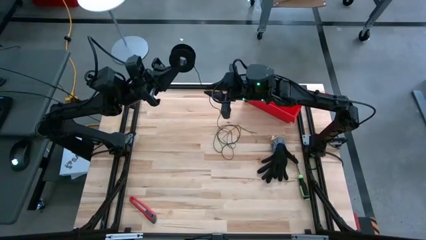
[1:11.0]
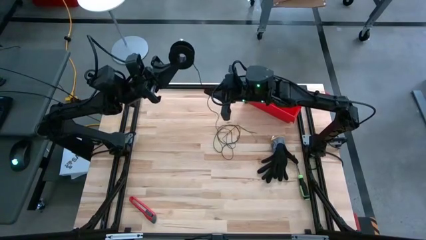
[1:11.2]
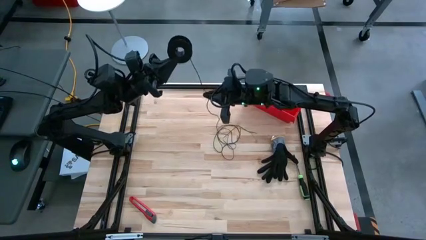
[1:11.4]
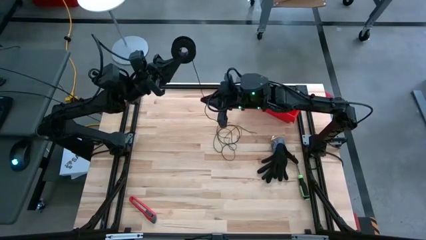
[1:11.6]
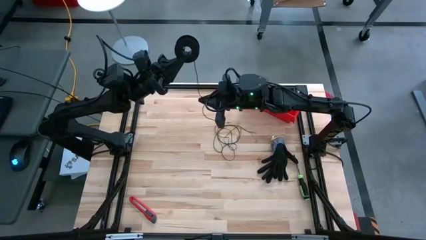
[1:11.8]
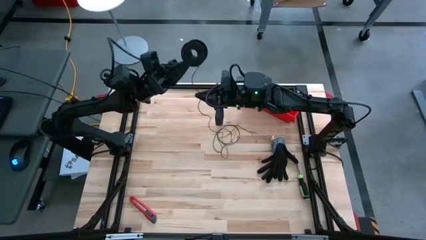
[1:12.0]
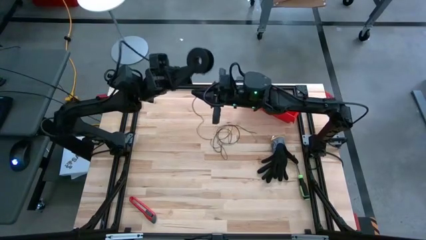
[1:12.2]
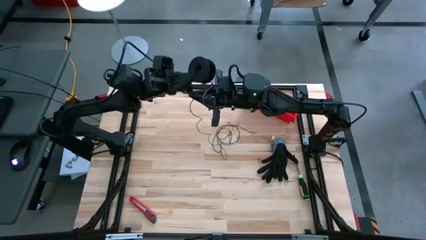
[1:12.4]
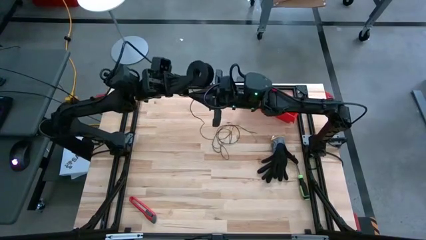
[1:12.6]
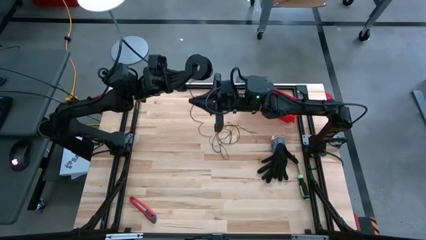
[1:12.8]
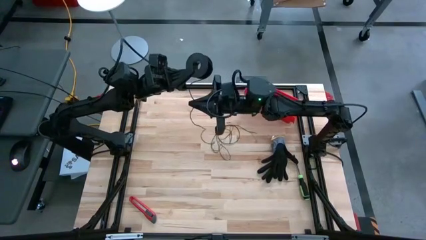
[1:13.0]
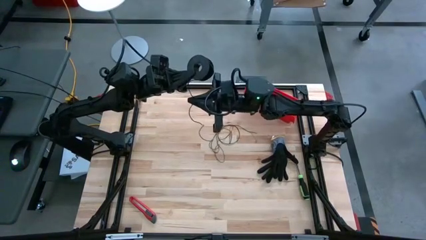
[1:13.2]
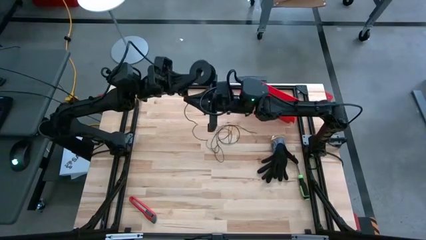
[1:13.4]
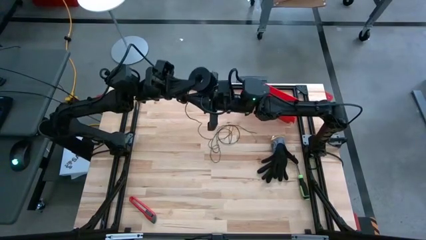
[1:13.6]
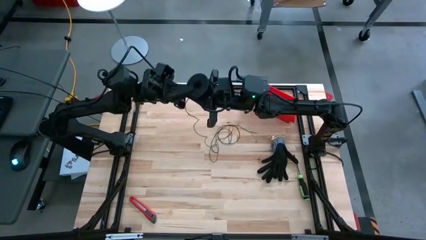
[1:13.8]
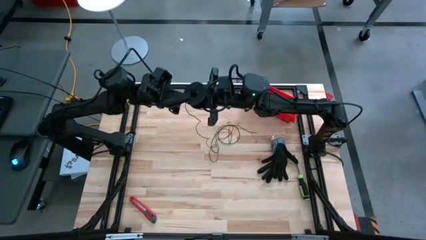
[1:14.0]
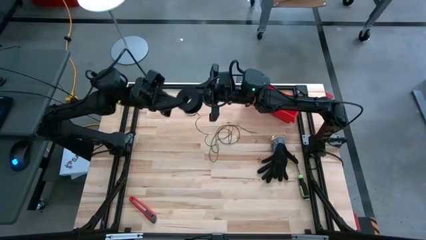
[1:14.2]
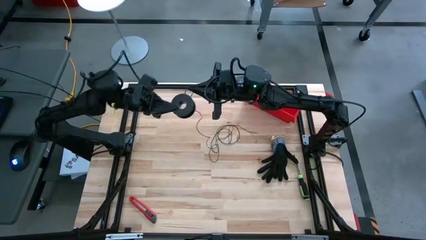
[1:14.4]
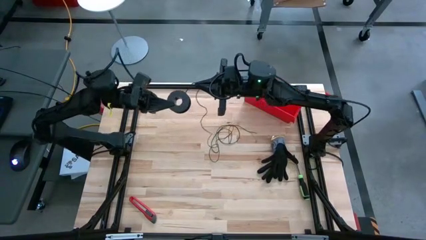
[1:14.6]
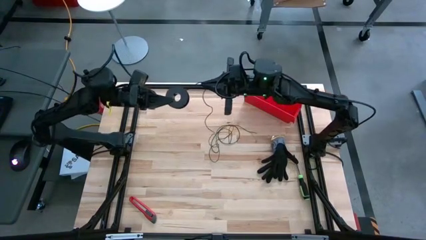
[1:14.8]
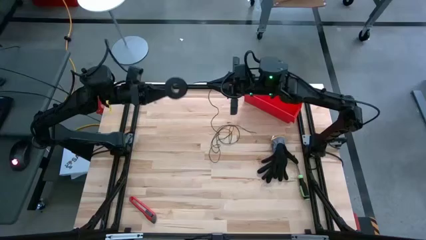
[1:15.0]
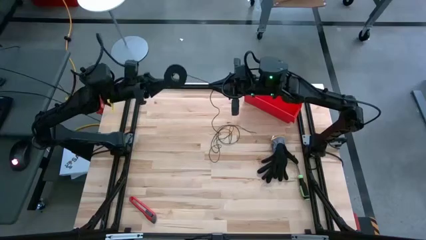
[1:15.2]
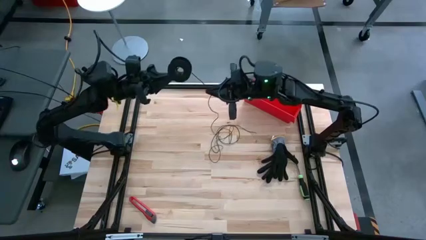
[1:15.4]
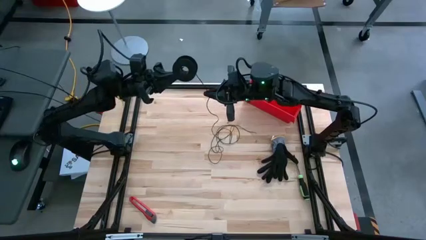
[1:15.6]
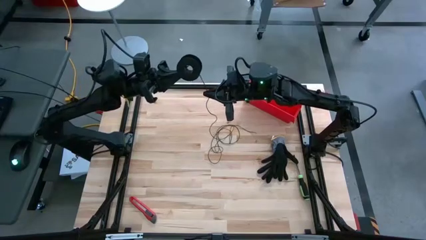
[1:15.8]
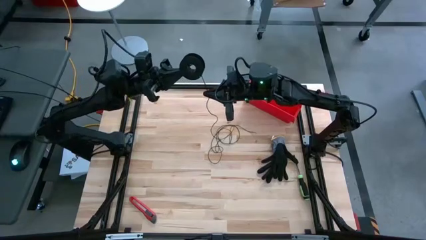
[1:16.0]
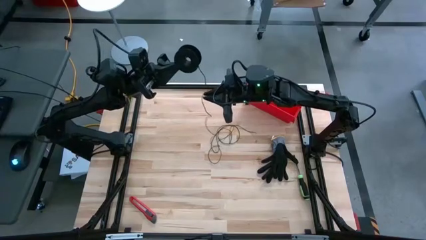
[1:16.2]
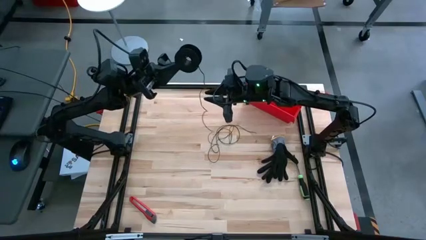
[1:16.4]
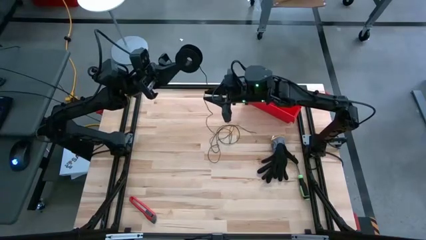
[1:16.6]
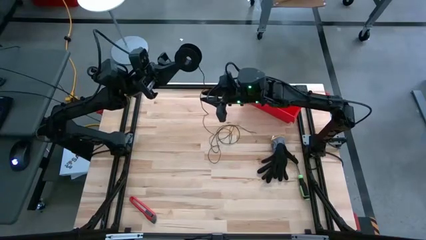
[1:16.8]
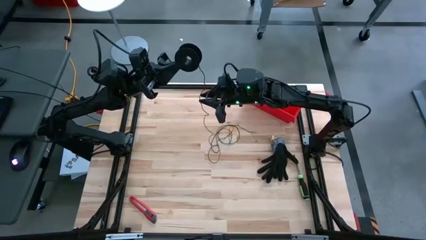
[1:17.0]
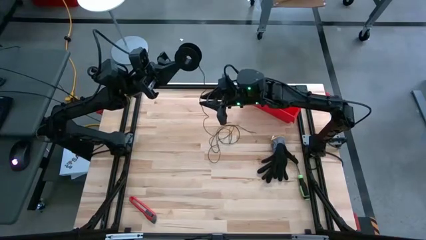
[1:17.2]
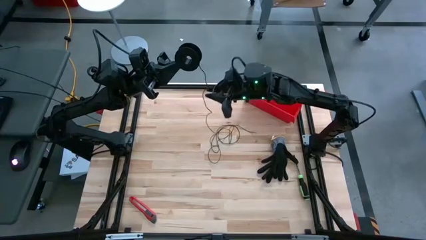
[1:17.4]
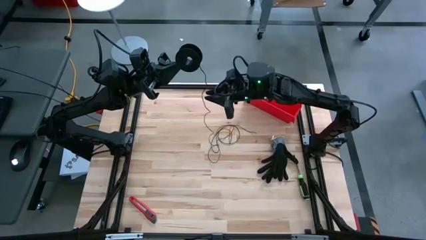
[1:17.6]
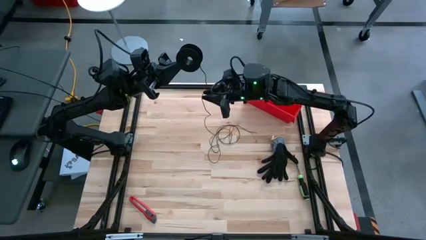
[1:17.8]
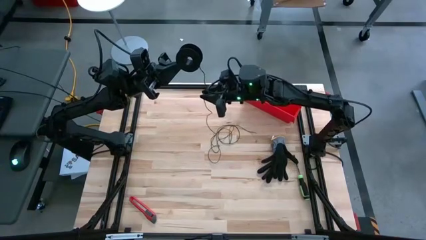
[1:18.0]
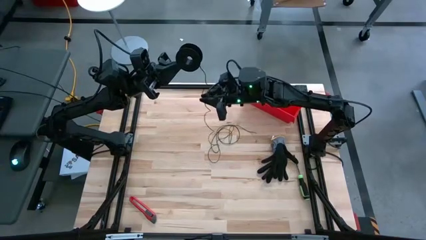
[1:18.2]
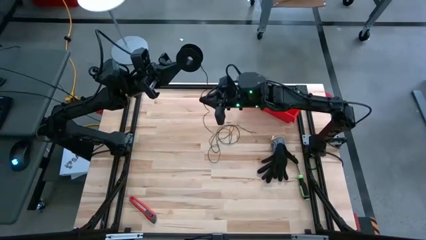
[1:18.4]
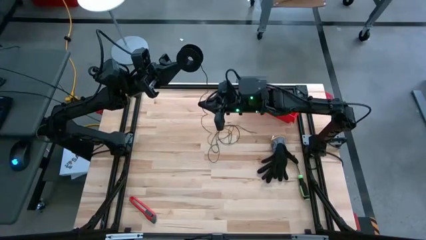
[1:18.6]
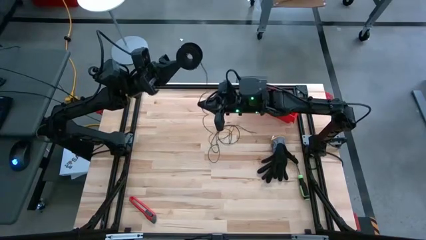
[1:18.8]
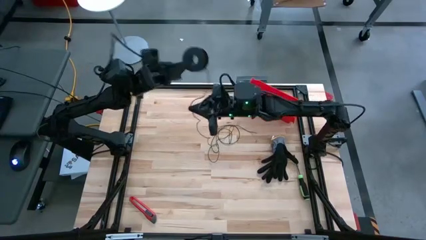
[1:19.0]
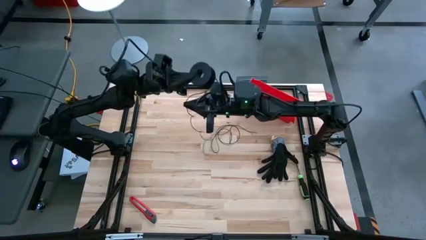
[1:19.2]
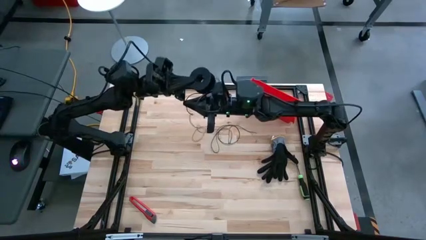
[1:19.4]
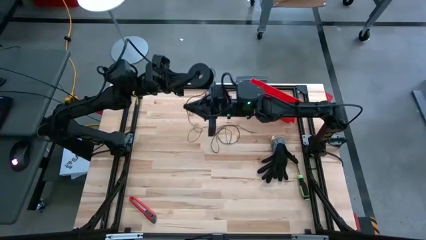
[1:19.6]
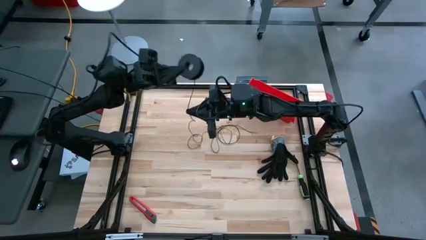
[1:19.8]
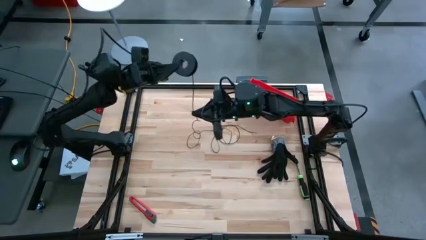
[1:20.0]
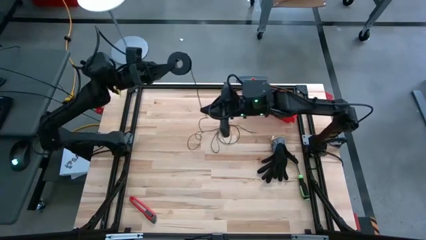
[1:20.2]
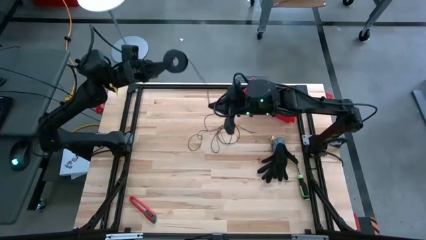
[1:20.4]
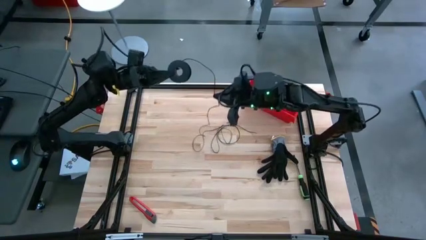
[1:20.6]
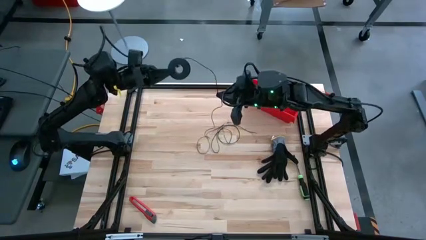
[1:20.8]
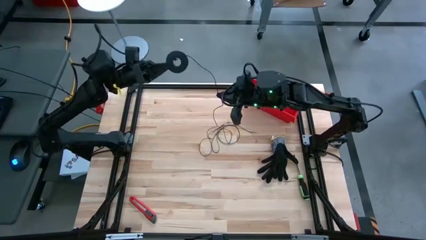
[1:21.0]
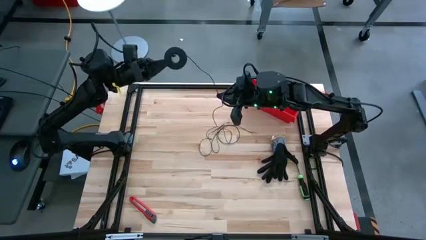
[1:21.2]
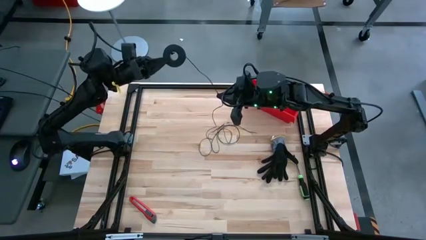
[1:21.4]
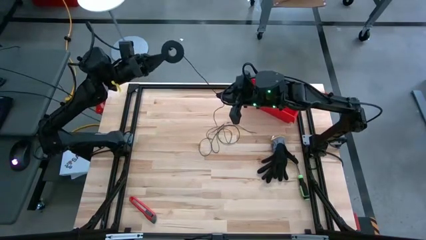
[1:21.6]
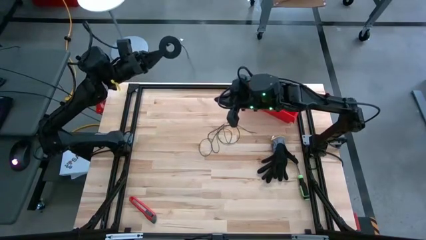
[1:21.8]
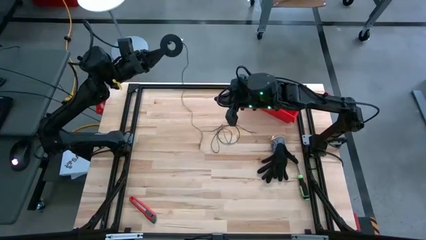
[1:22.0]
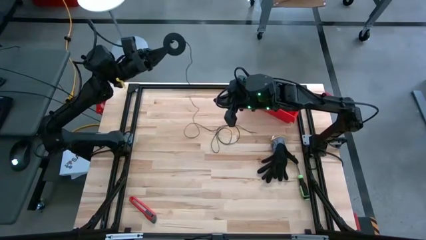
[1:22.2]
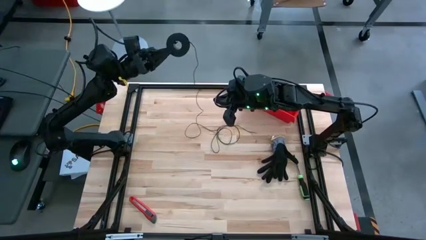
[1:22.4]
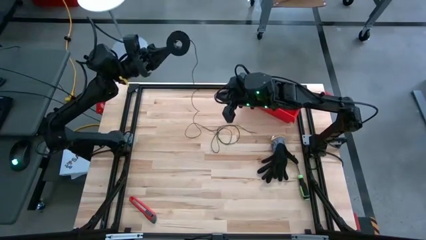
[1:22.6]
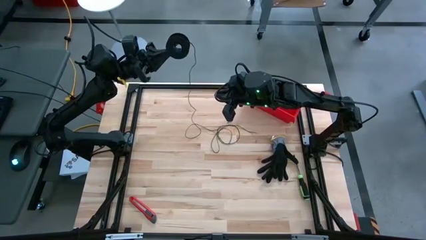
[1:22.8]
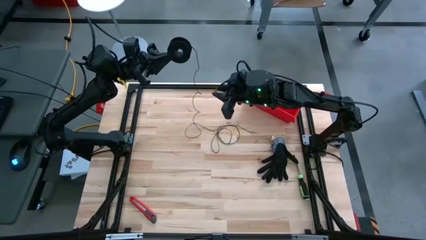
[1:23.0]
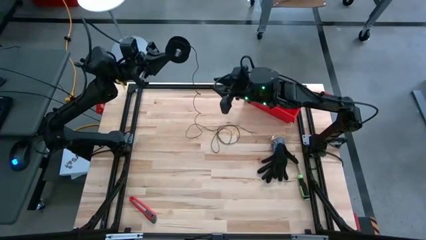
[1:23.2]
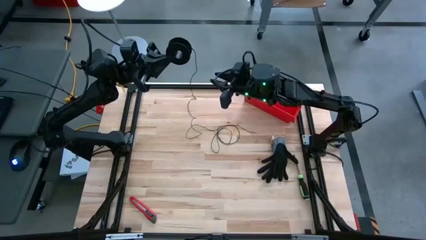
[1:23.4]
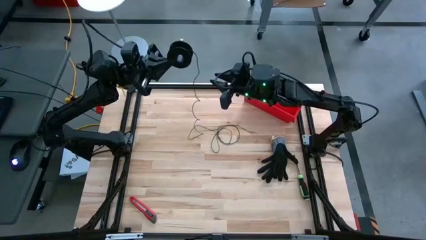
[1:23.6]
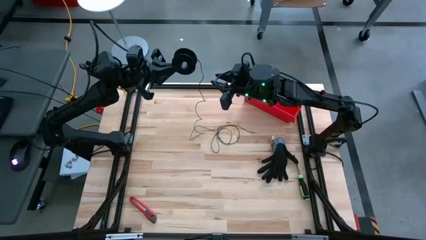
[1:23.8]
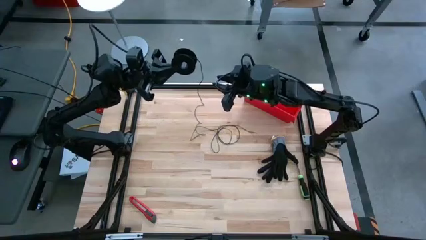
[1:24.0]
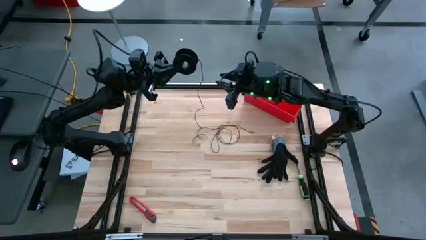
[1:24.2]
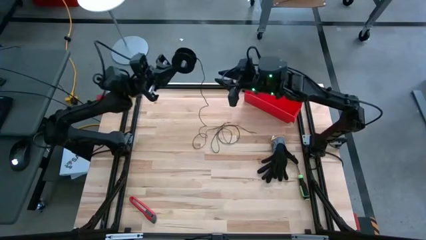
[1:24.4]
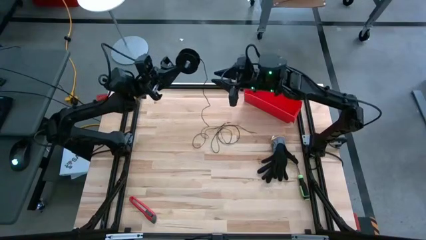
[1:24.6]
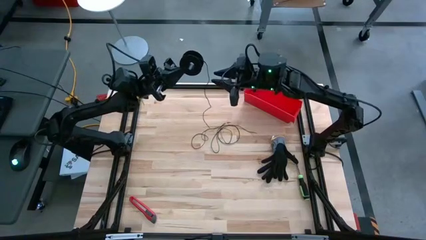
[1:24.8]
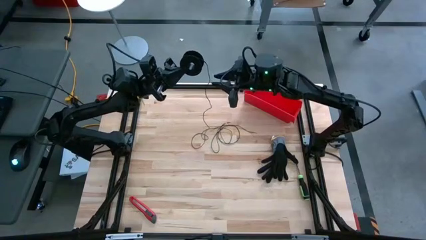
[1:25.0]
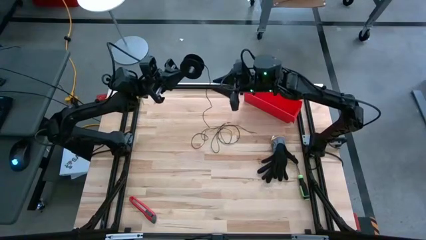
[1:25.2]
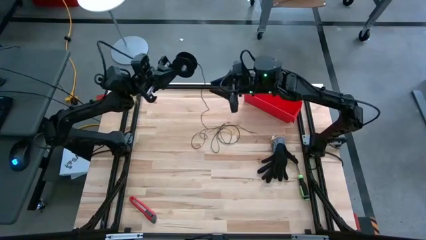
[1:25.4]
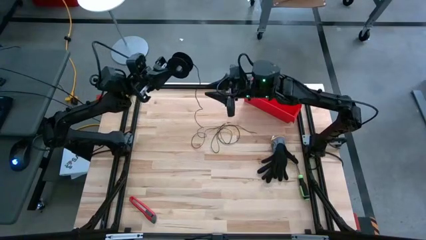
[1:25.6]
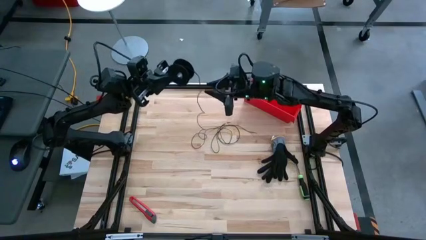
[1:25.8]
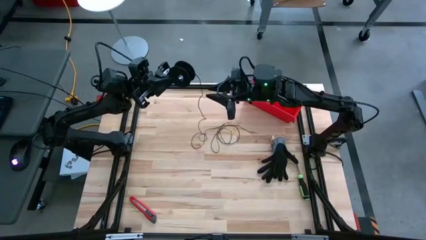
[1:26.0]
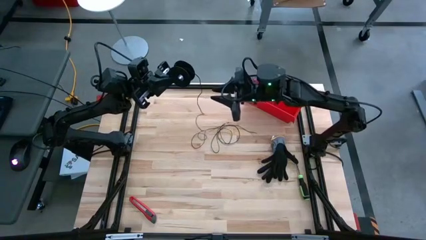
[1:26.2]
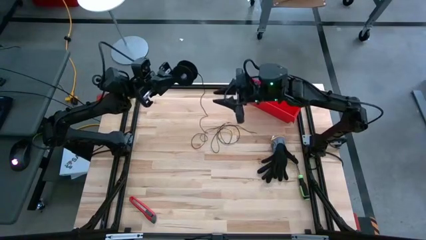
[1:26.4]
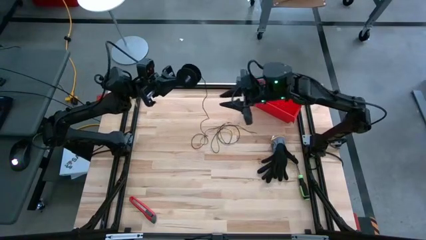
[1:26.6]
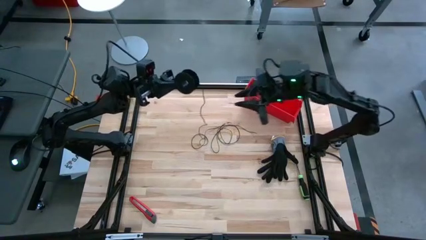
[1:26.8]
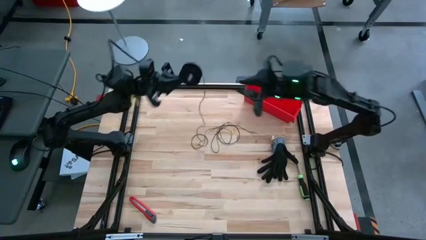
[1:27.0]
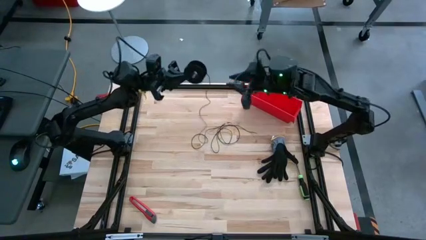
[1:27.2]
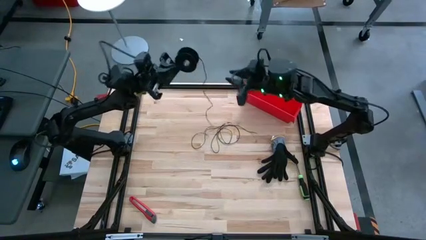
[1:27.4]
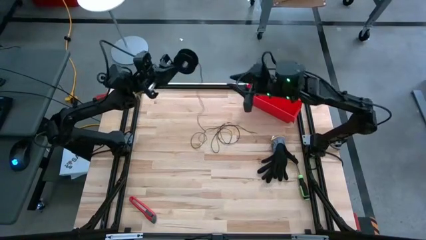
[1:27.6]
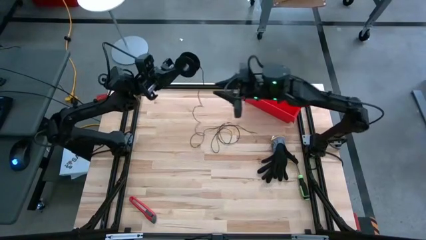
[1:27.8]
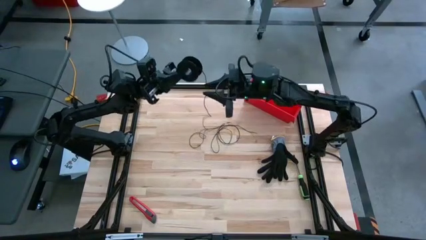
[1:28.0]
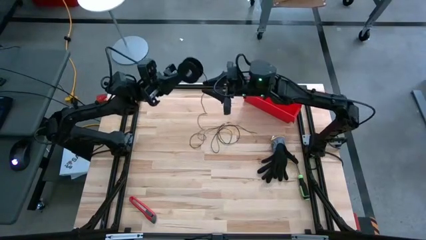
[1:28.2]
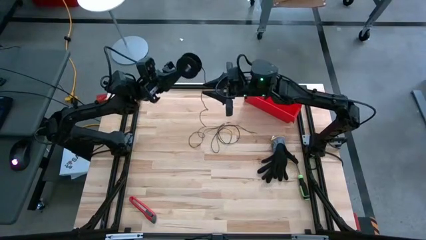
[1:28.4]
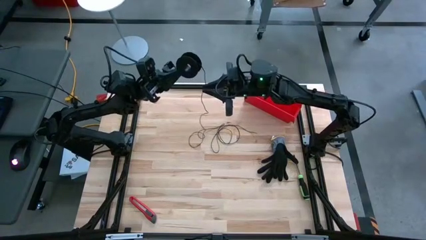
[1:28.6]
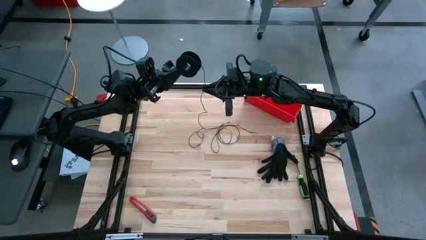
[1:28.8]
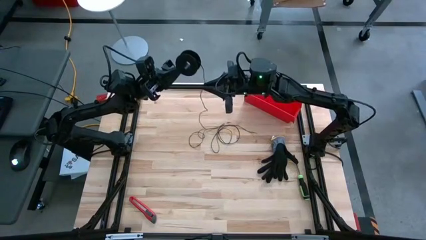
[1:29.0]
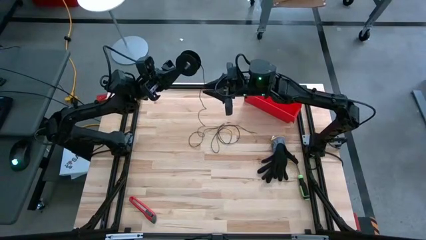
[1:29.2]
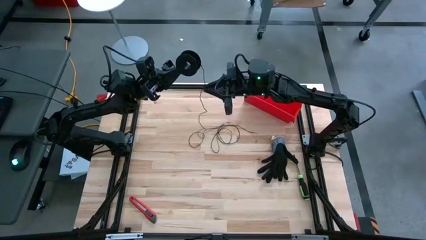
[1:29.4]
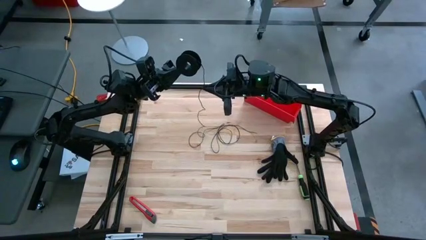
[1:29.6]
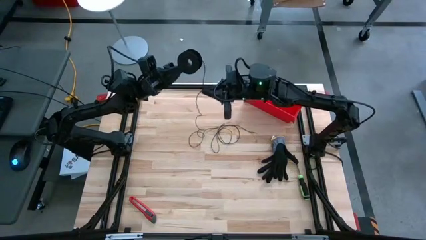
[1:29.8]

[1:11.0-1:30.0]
Task: Coil cords
Coil the black wire on the spool
